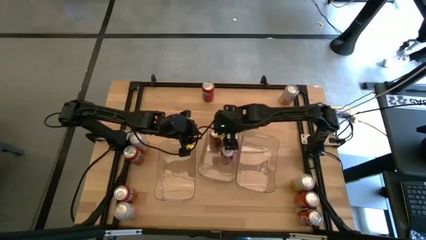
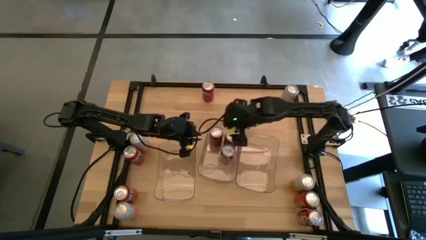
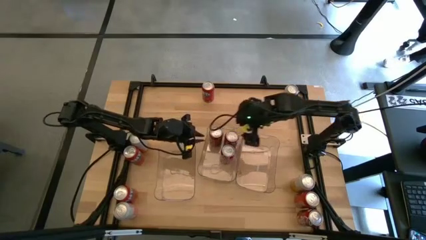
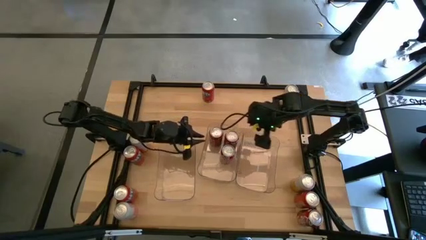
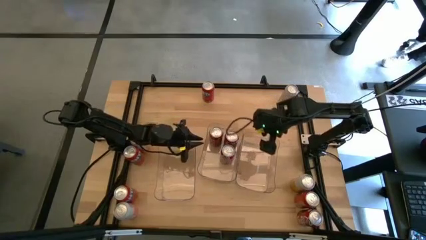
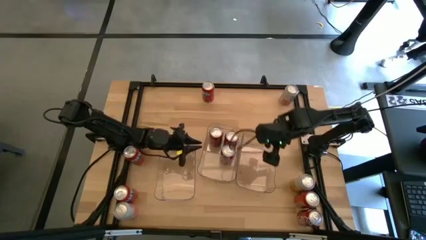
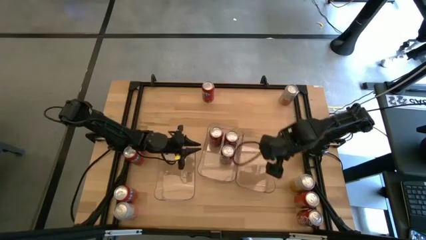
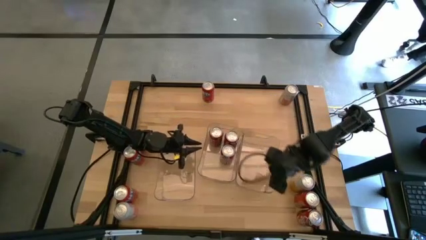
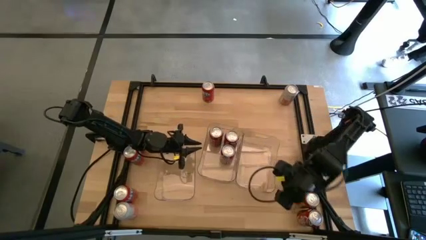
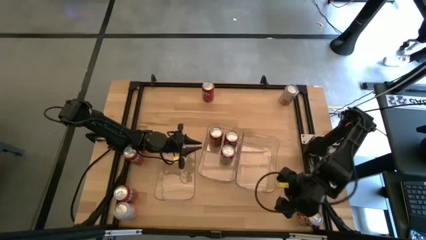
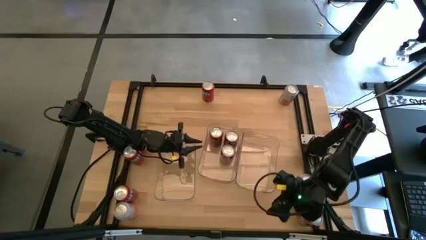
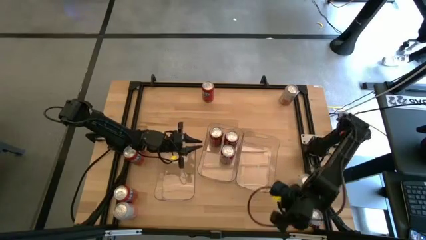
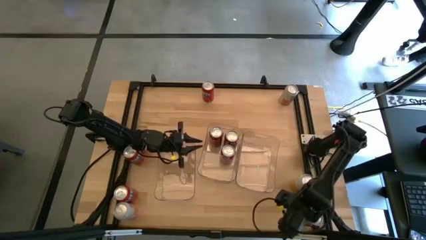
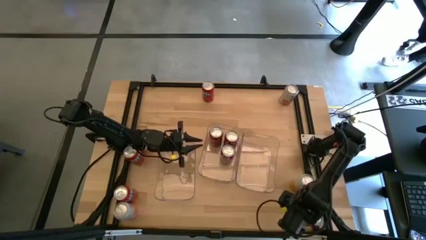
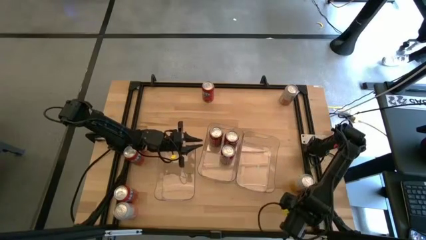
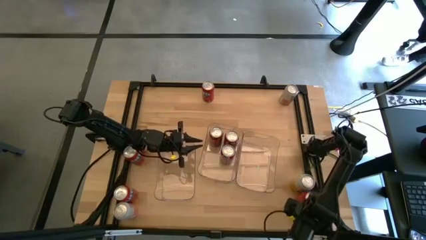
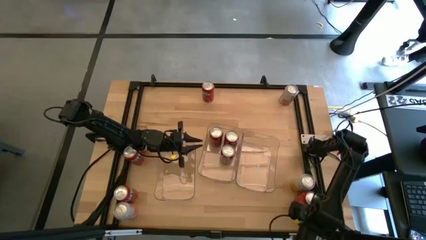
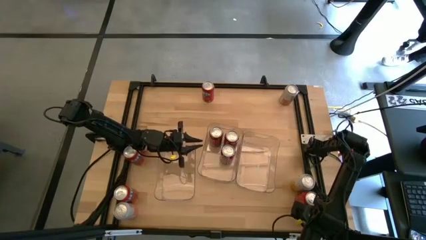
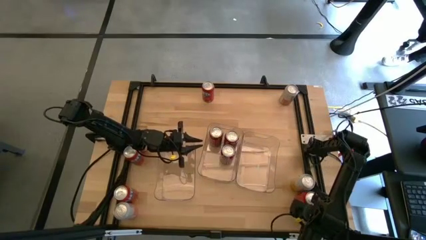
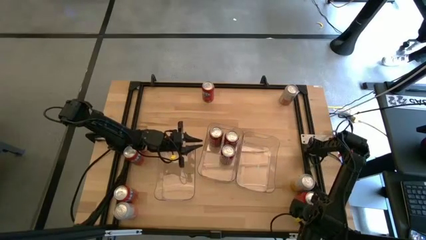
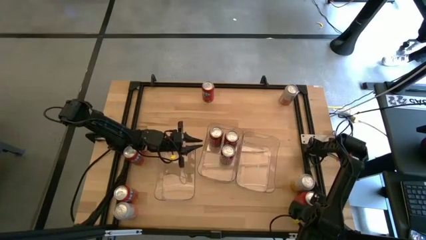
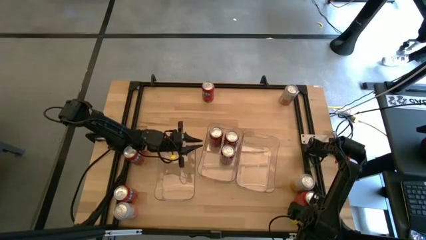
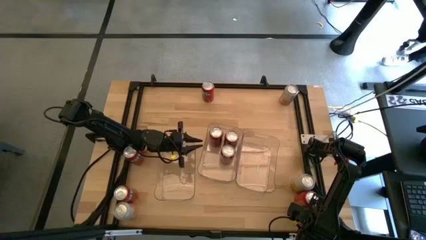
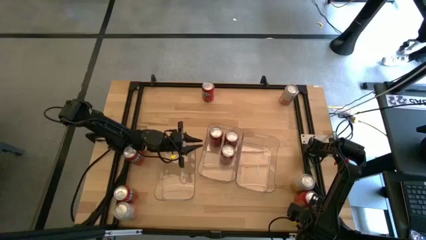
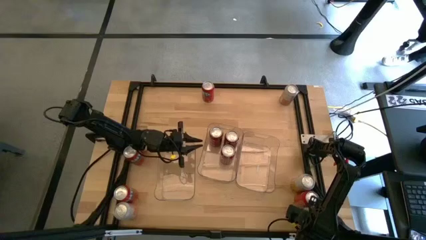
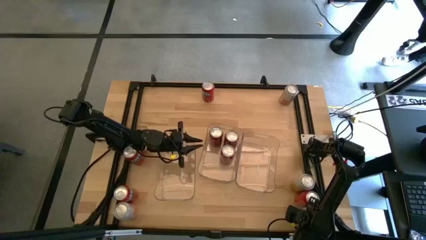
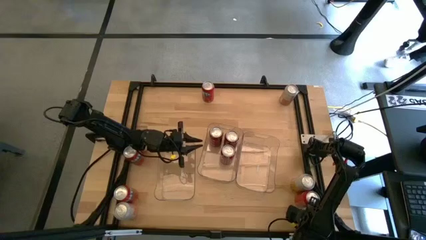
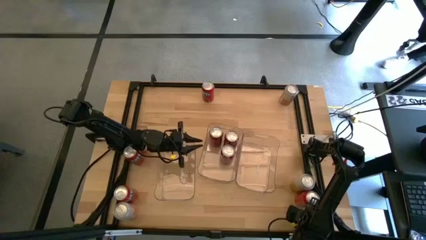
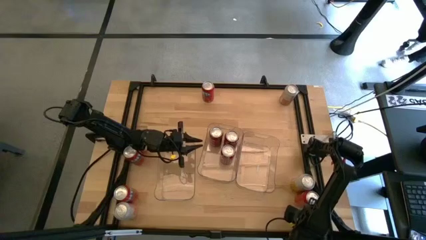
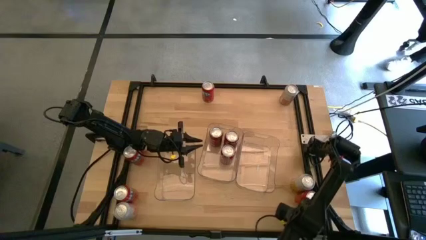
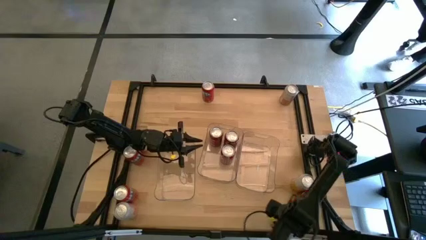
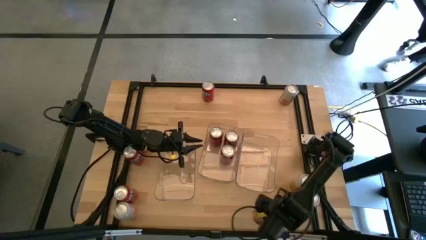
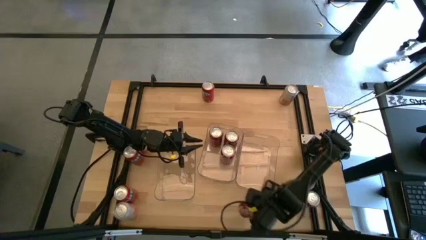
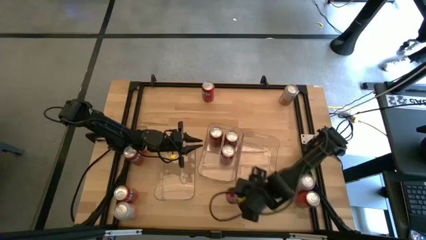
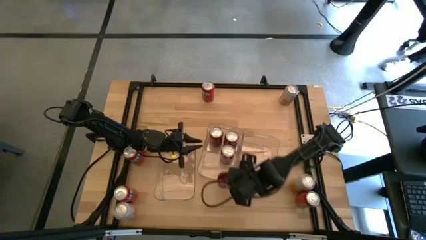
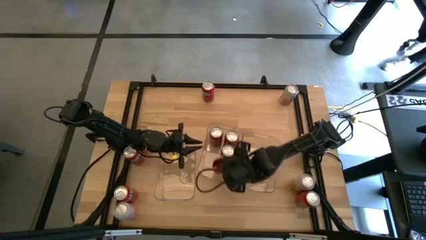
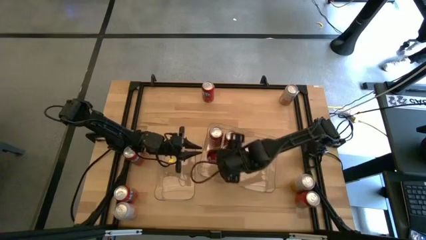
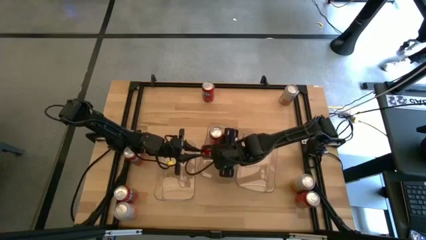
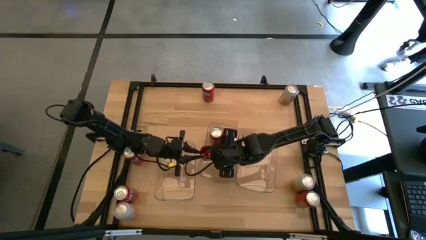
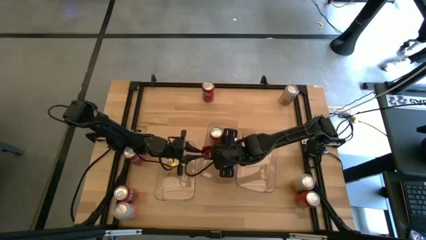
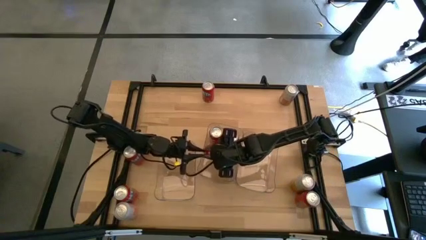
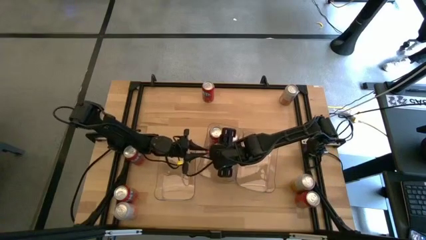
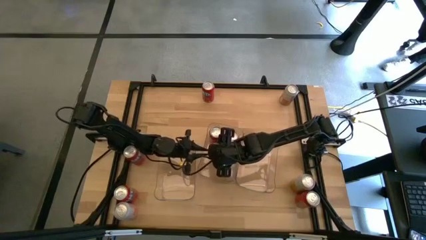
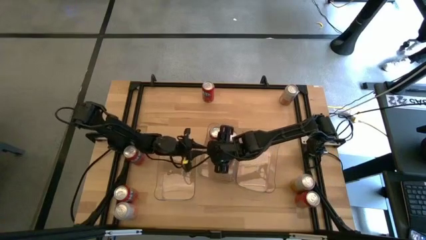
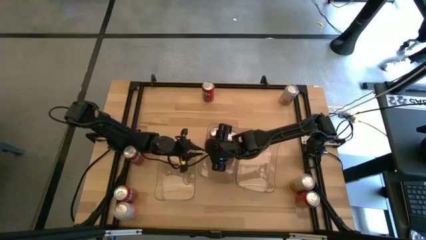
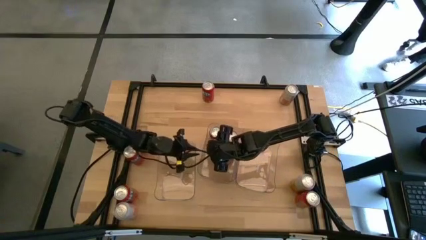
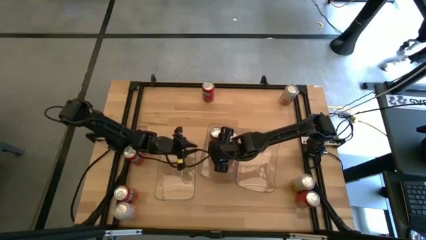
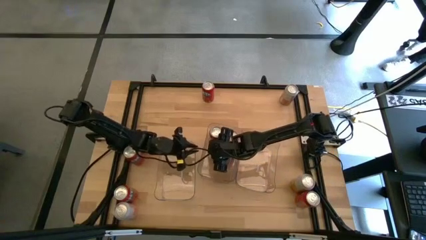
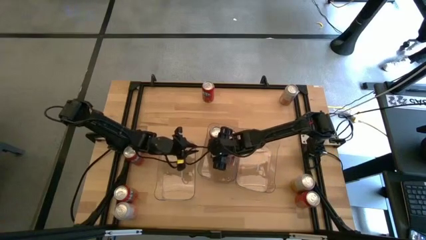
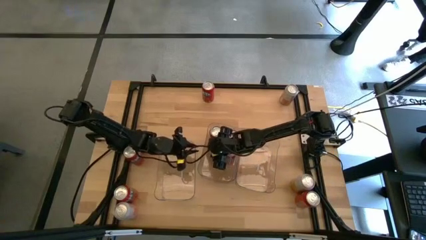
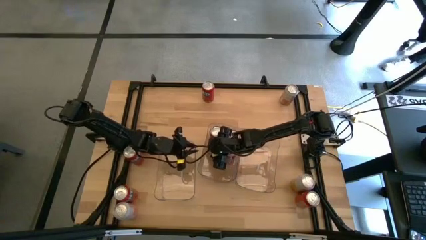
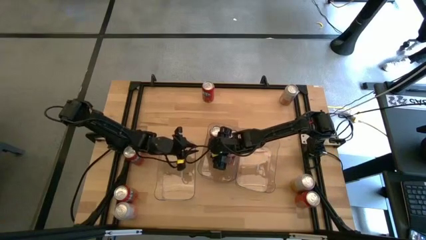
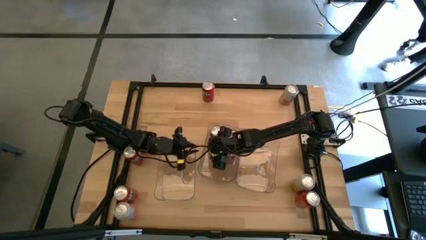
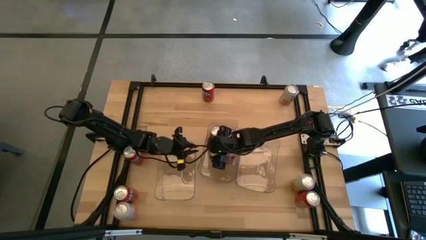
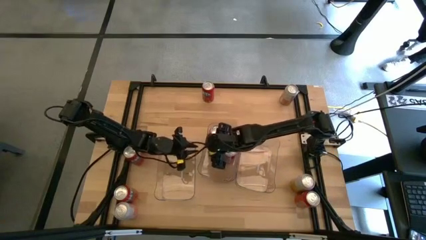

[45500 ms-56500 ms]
Task: Sort soda cans
Put the red white soda can into the center transparent bin

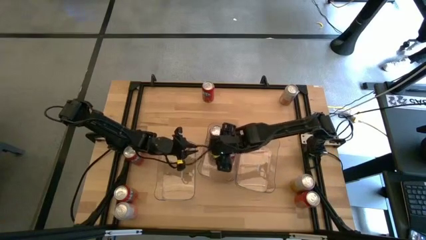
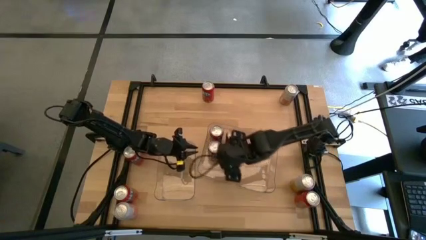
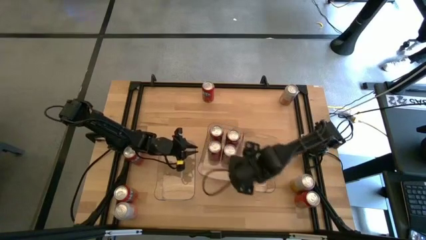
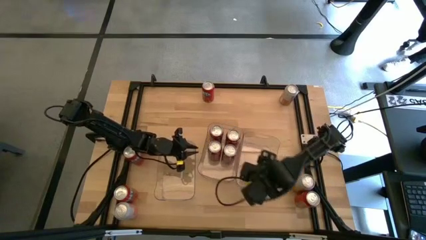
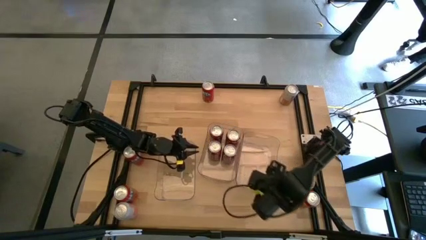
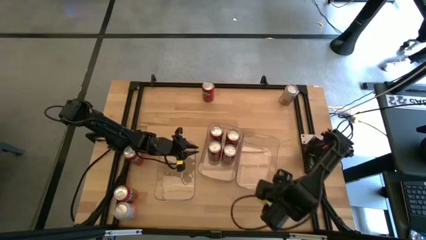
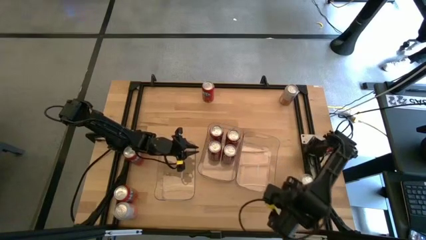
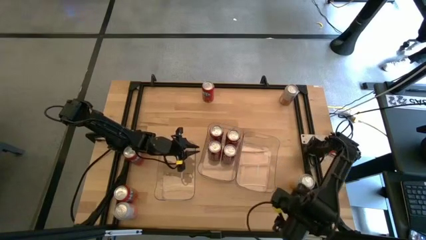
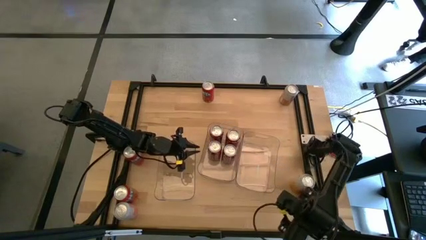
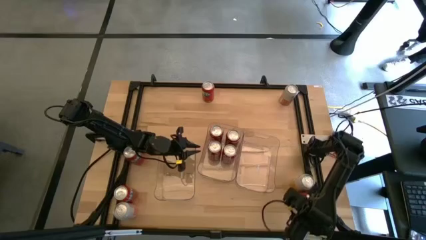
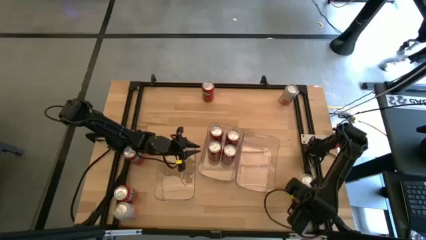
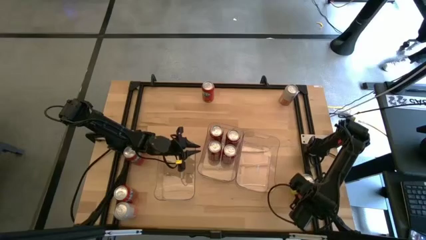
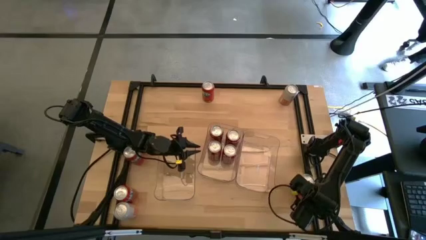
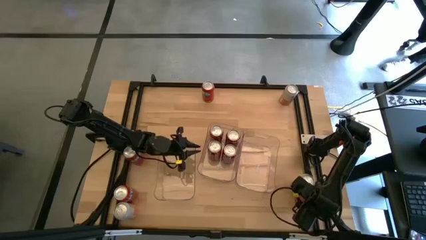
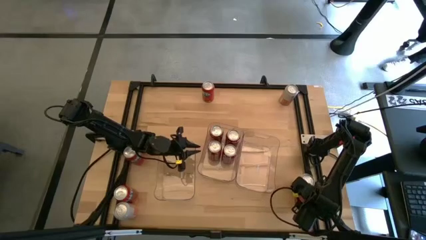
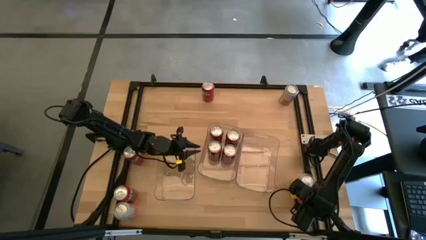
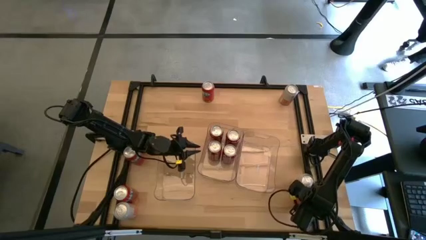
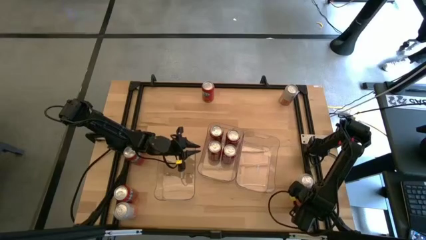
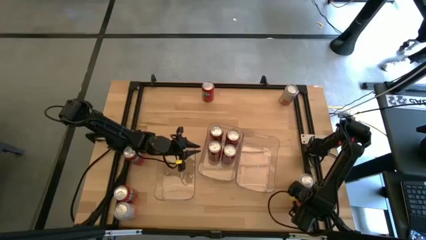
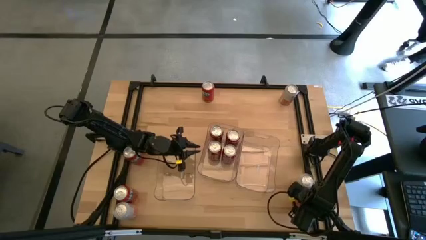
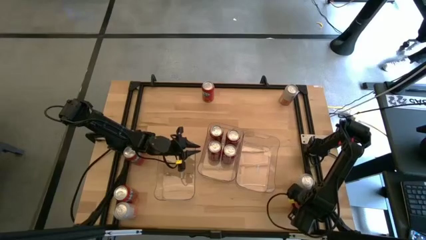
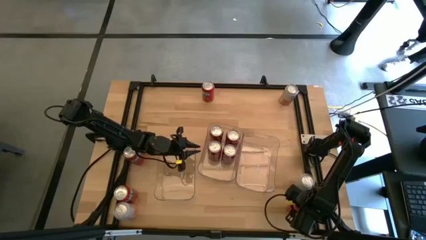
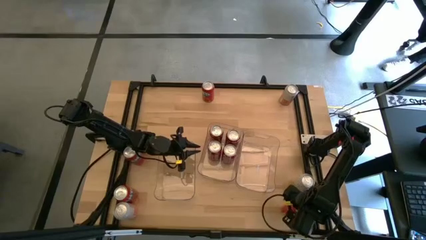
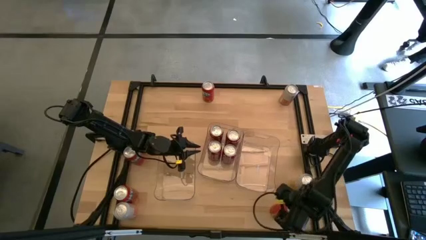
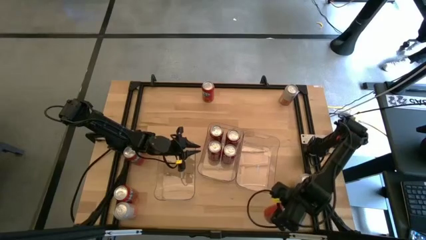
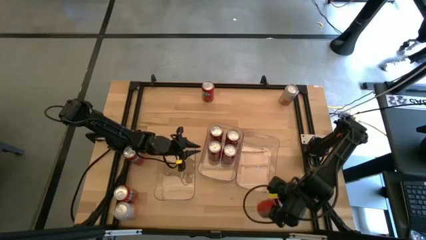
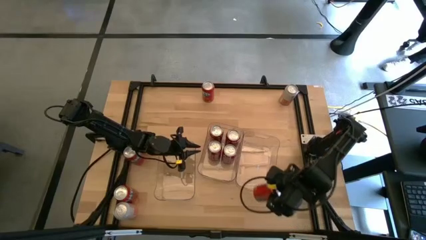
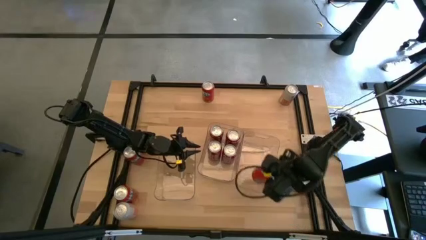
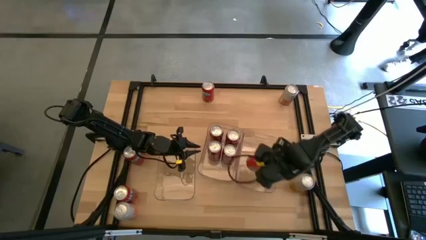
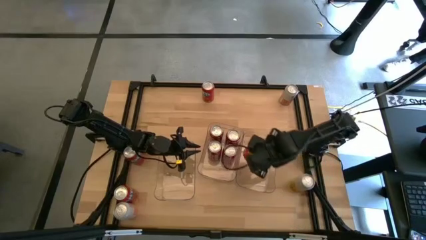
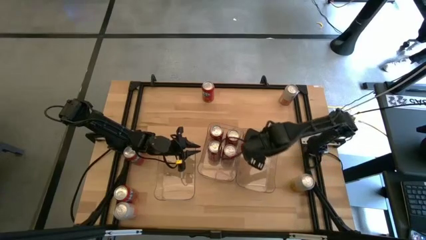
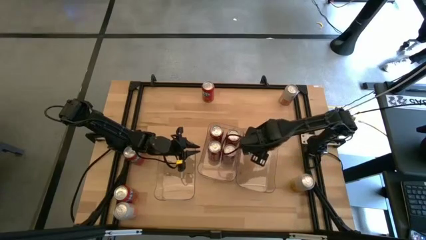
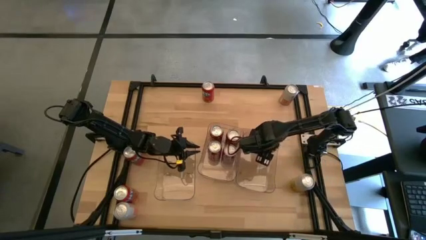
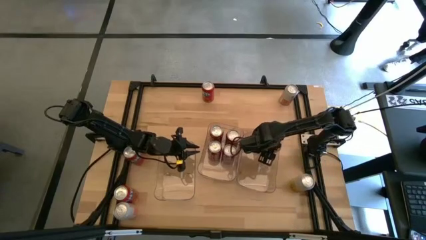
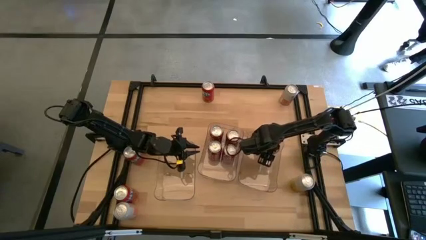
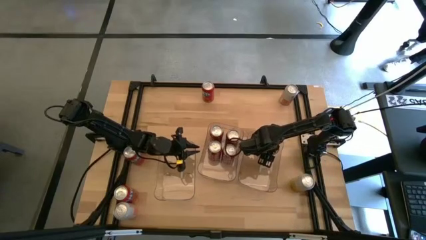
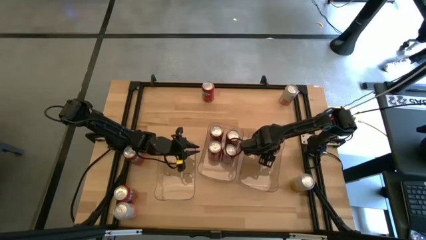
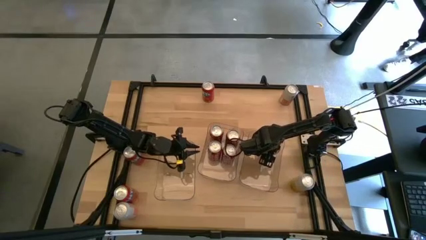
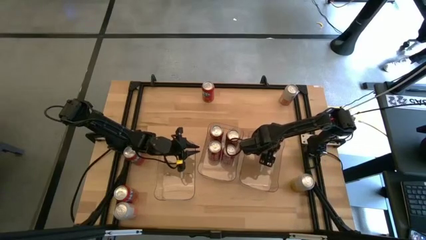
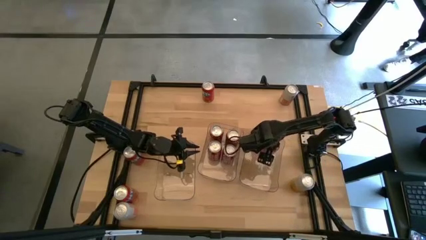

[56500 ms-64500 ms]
Put the bottom right red soda can into the right transparent bin
